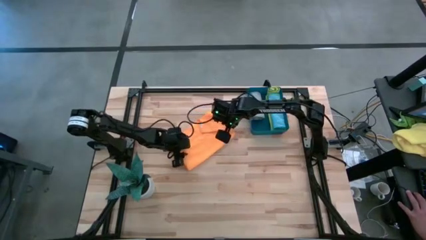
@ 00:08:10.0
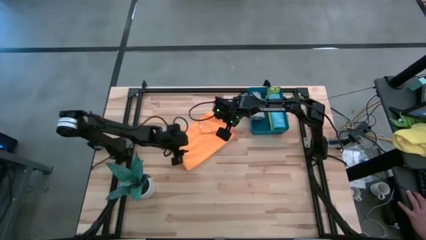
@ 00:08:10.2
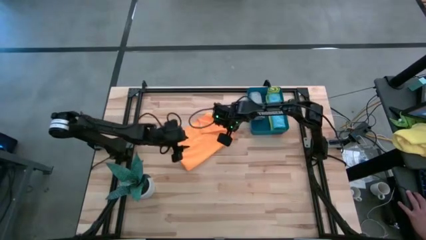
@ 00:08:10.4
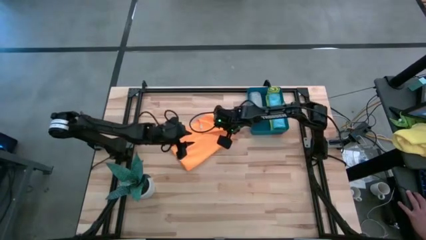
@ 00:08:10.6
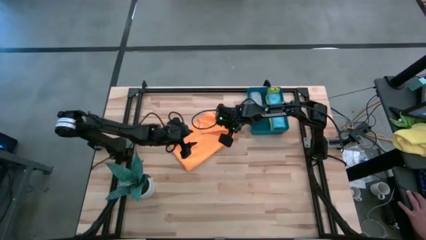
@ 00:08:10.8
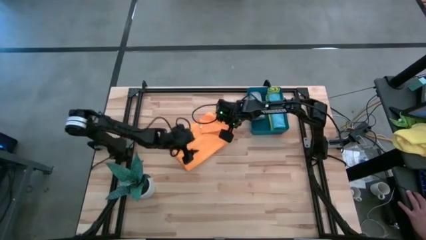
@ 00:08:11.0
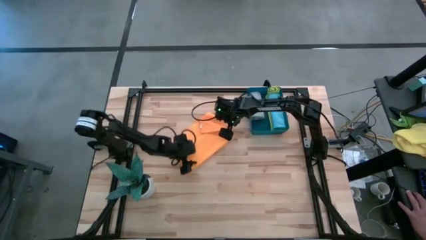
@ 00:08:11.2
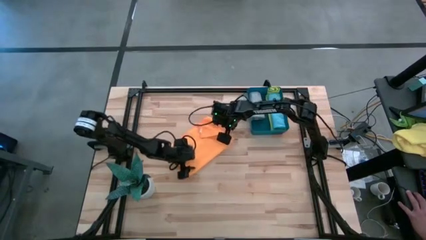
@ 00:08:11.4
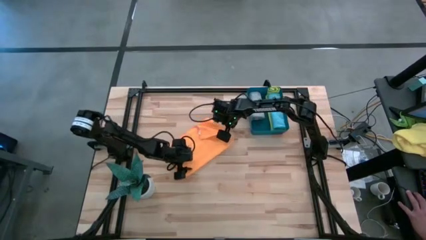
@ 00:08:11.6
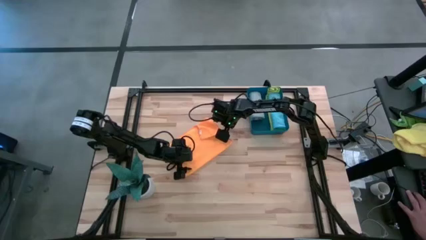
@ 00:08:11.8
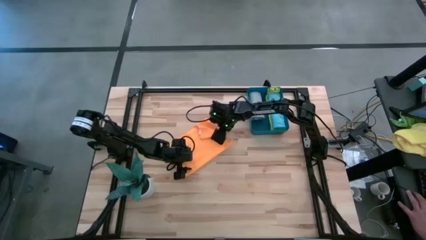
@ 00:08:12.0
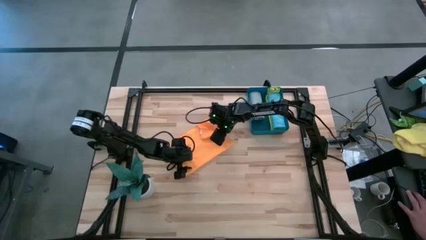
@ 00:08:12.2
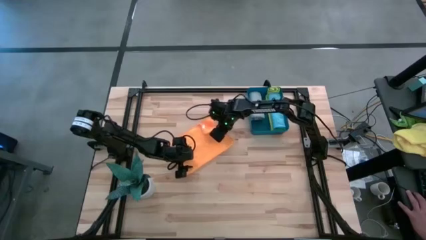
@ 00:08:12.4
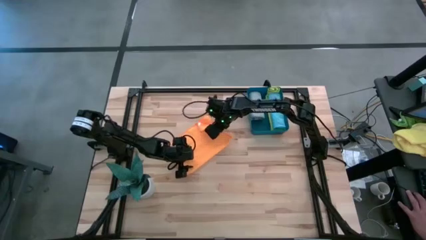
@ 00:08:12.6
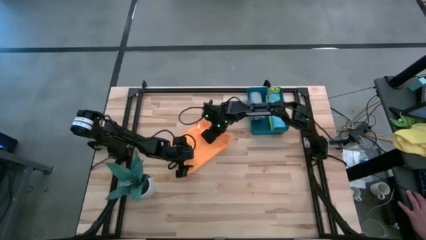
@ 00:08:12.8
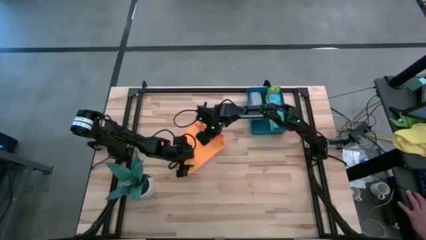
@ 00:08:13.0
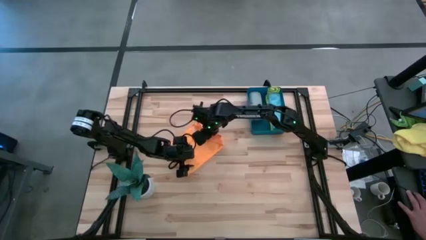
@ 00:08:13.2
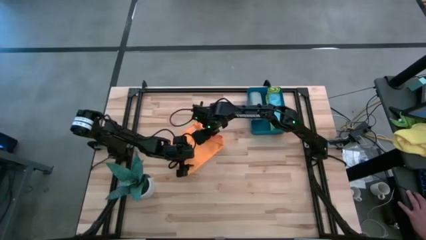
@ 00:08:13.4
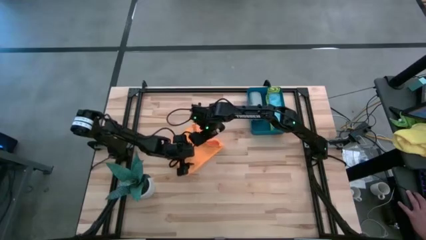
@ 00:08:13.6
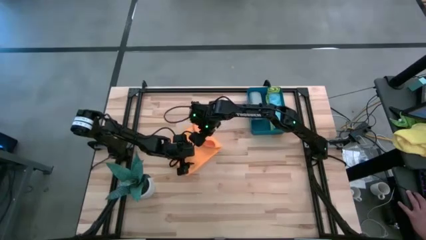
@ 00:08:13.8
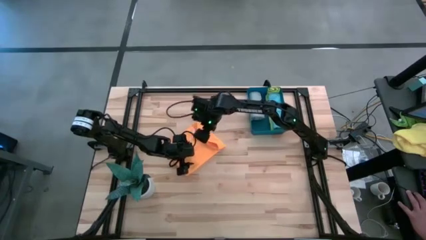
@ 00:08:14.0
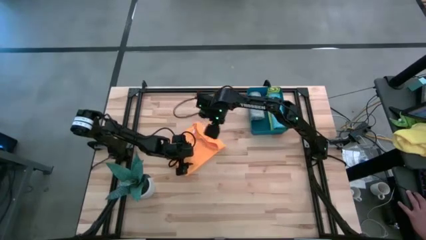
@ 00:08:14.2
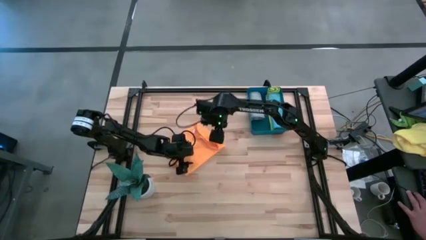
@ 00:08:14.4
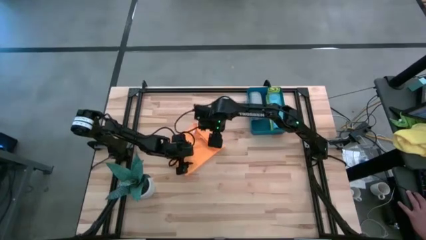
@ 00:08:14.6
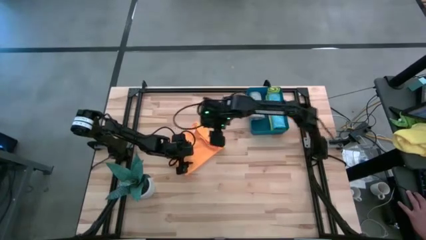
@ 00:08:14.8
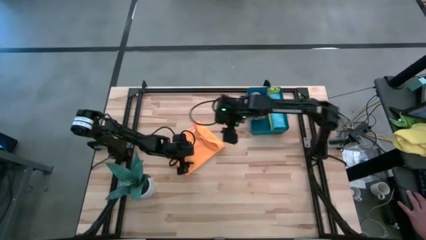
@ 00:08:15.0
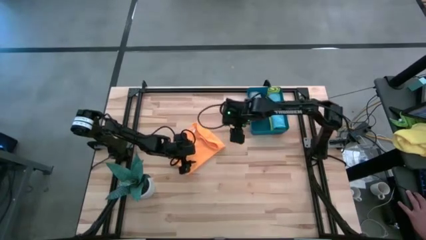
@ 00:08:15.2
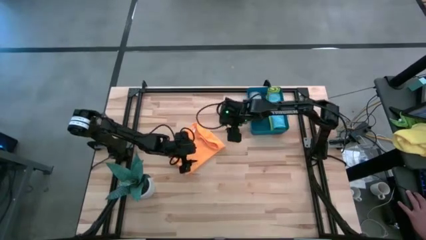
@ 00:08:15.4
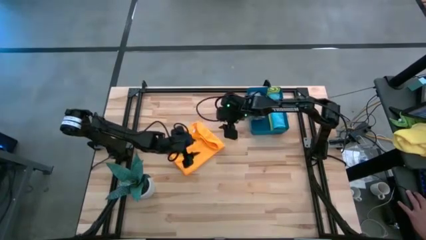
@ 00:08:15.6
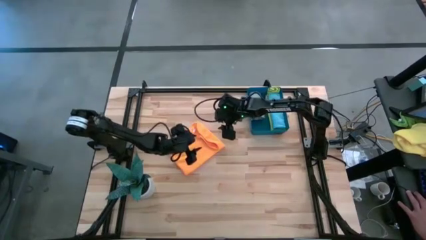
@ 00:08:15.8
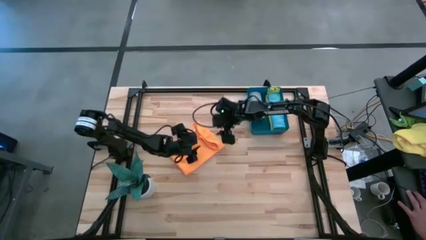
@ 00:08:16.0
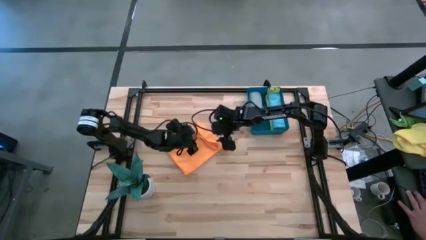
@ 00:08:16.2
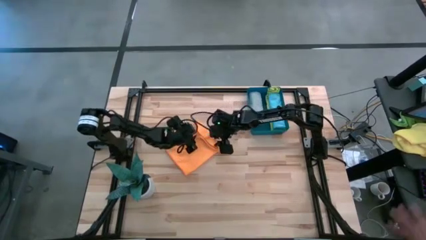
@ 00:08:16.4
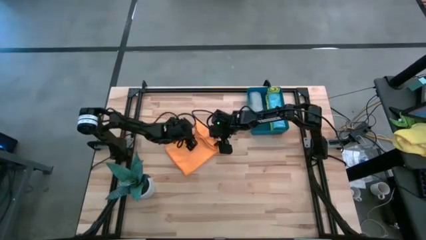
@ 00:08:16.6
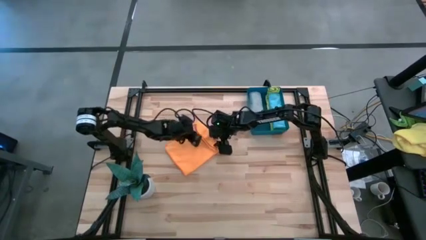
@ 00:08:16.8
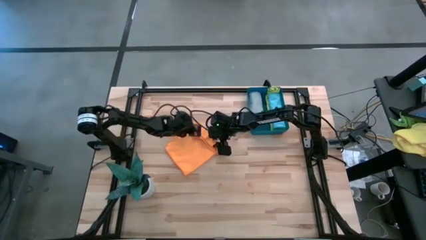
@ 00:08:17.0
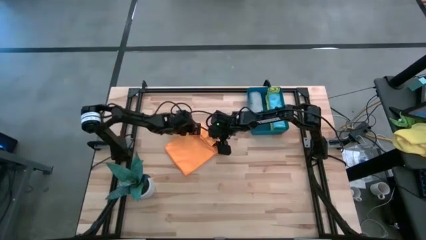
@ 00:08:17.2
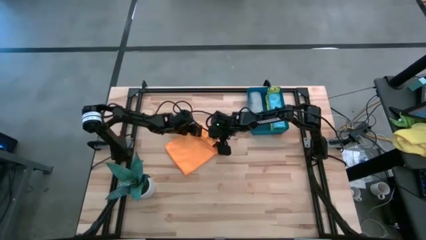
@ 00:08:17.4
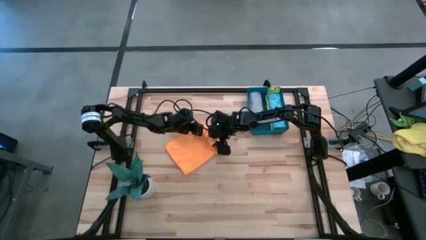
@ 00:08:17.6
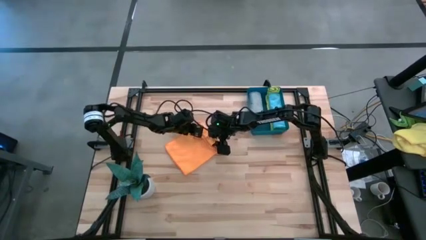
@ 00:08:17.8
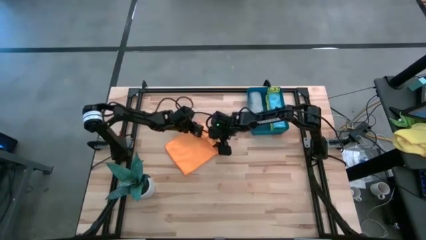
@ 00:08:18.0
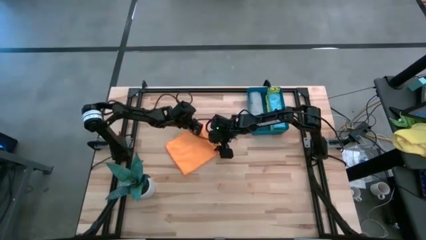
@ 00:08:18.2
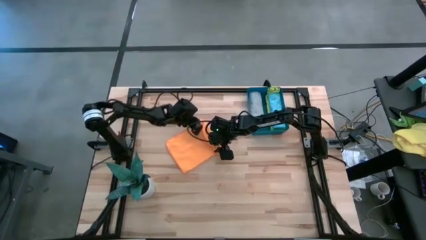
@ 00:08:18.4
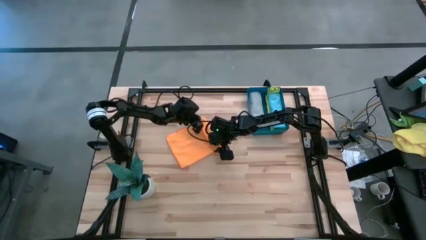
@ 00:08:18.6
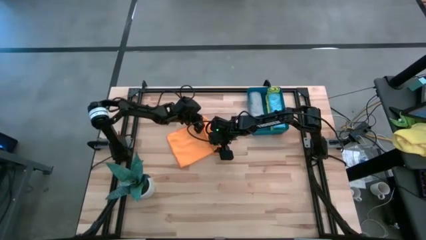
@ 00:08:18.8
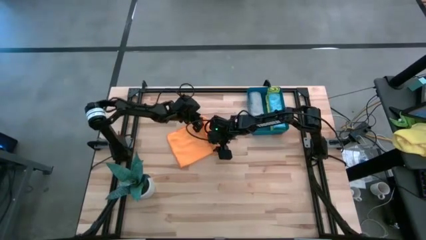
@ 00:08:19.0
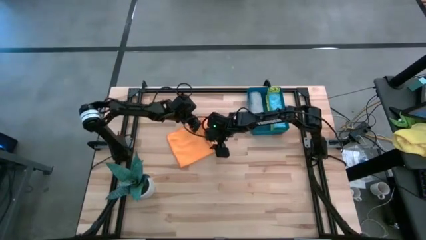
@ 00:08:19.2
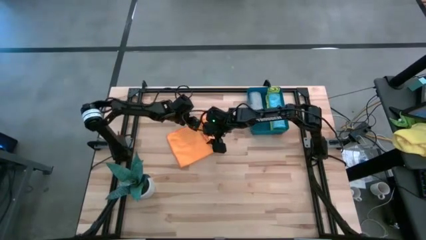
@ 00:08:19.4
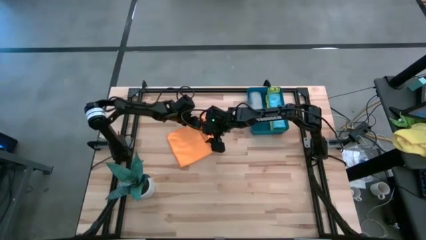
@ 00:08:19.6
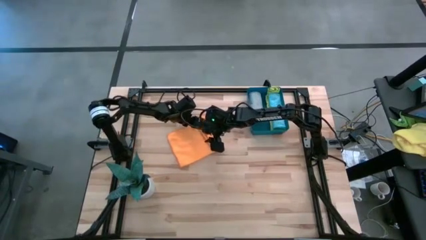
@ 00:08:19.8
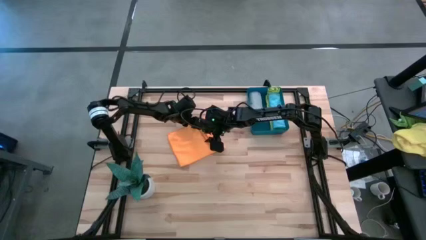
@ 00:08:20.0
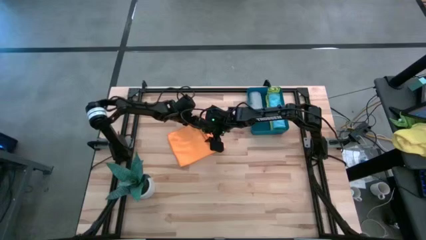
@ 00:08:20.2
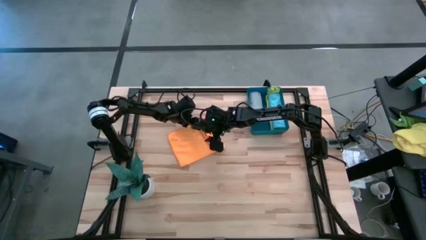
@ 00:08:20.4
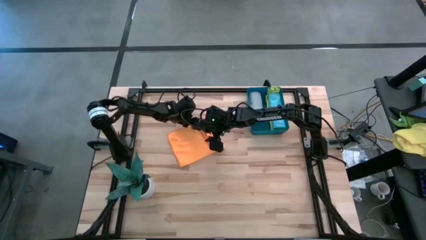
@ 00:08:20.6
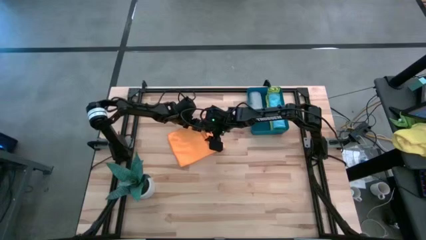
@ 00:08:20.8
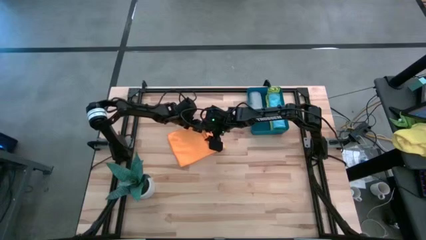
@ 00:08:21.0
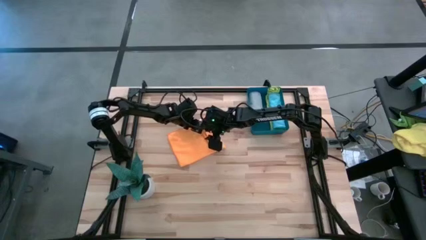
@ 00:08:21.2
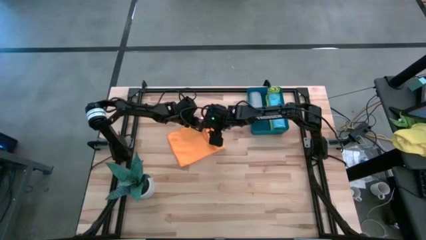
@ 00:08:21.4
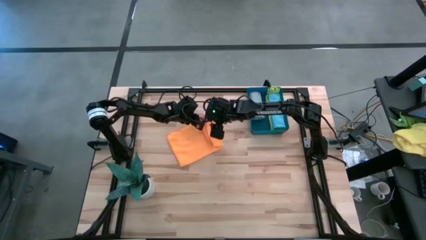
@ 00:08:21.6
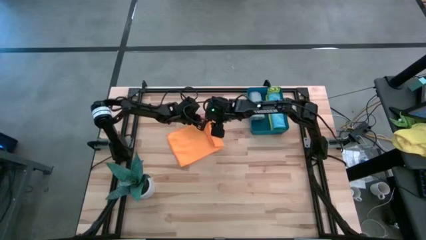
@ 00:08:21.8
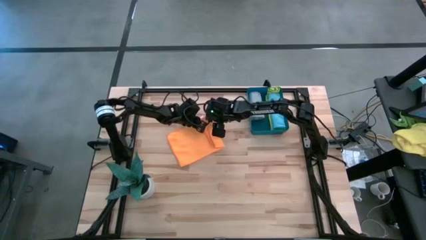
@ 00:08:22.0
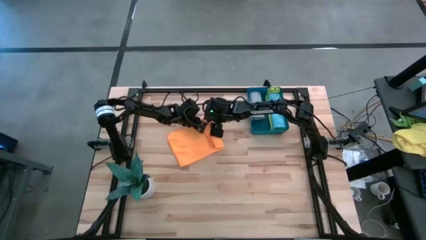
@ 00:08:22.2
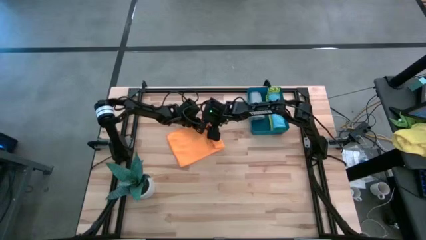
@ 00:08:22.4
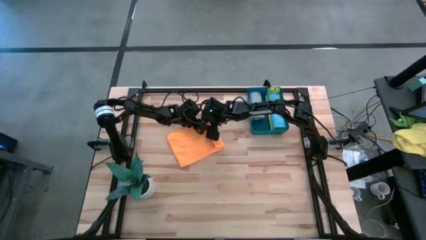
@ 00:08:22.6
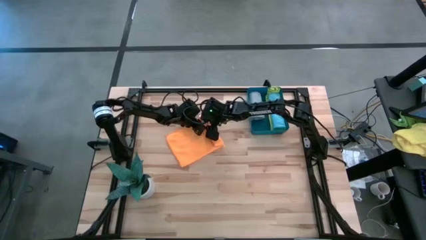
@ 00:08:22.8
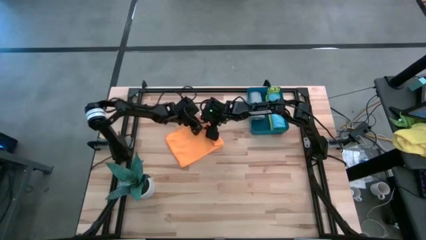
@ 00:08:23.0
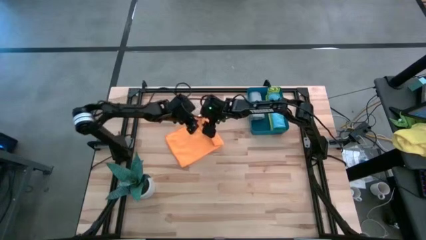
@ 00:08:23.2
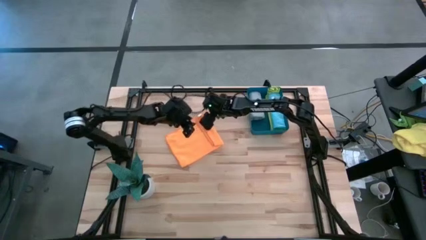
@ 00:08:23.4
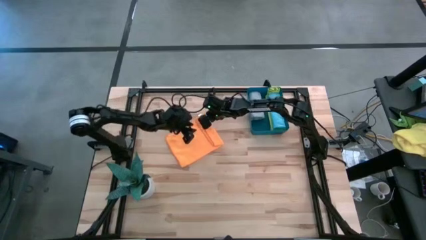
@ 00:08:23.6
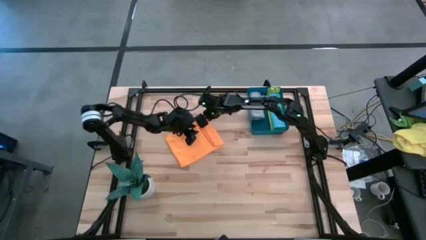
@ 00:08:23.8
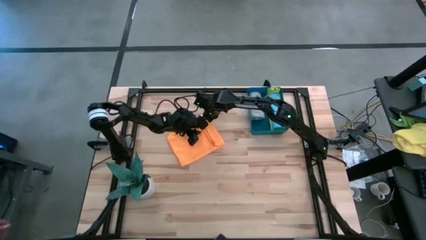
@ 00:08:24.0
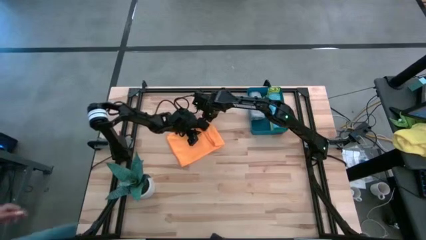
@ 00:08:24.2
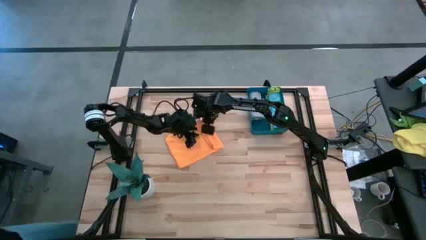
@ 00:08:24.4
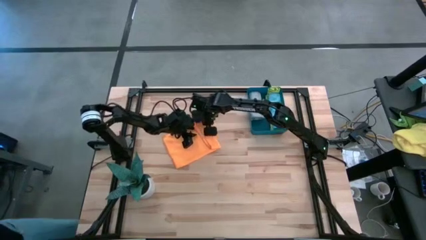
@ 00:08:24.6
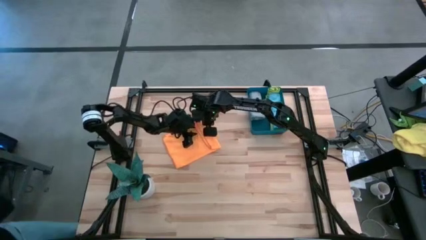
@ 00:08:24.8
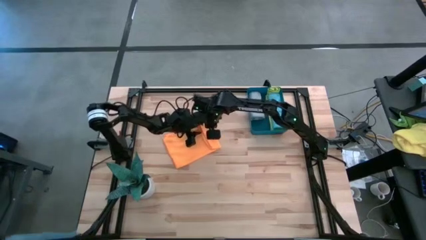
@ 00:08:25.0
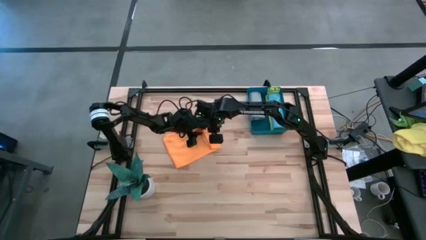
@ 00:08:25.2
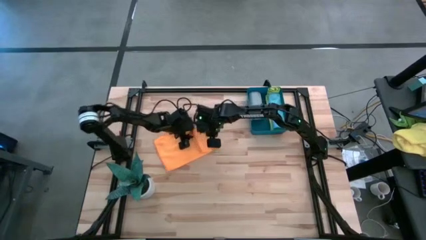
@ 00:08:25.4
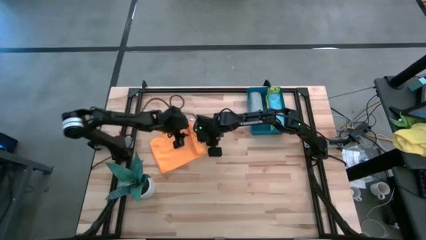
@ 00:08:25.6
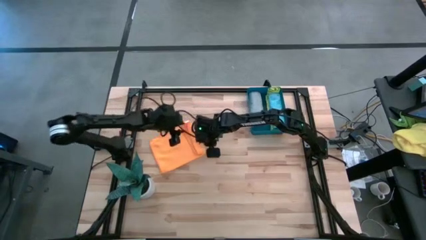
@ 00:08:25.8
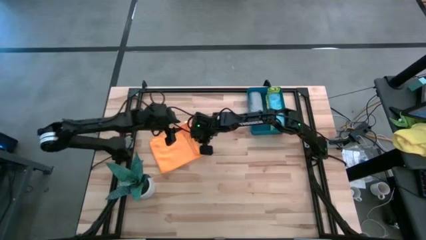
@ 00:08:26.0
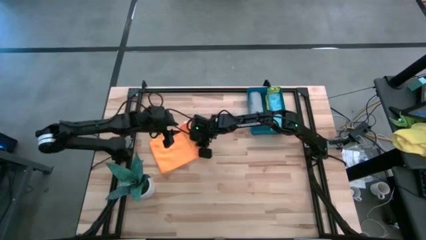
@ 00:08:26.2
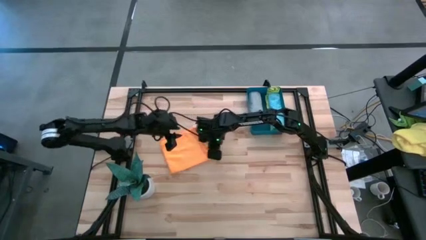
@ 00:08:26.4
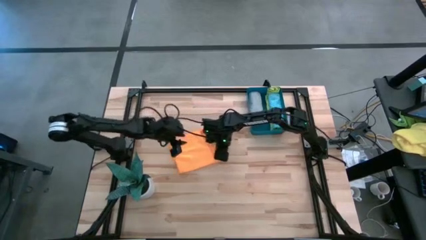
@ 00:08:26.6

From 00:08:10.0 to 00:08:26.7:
Task: Roll microfiber towels into tight, uniform cylinder then place into a basket
Roll the orange towel
